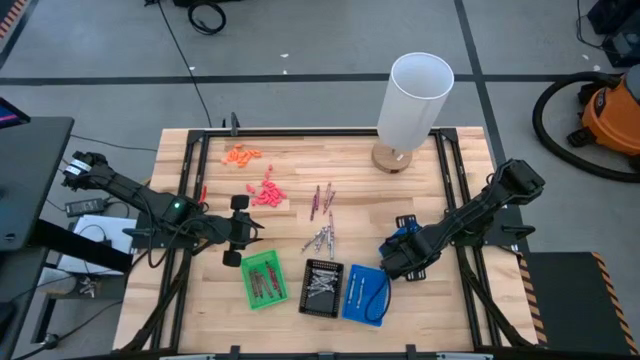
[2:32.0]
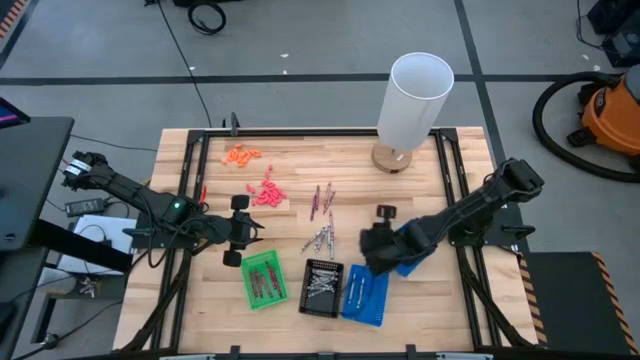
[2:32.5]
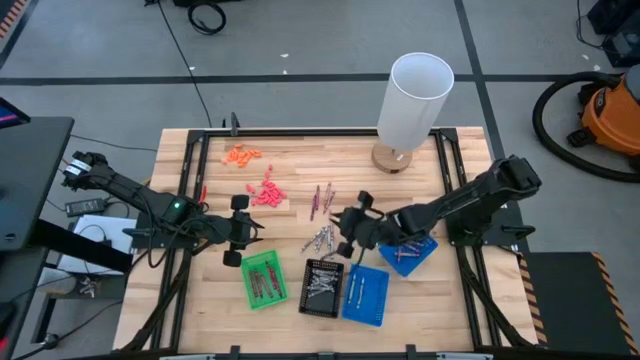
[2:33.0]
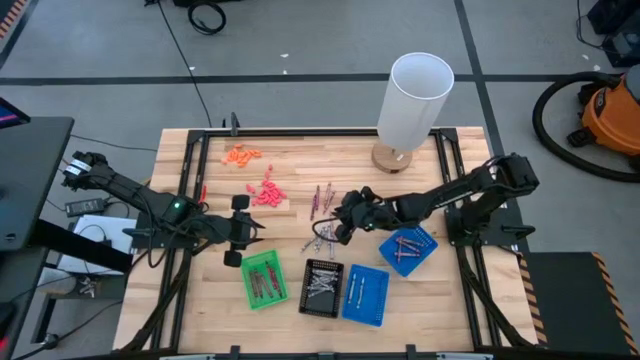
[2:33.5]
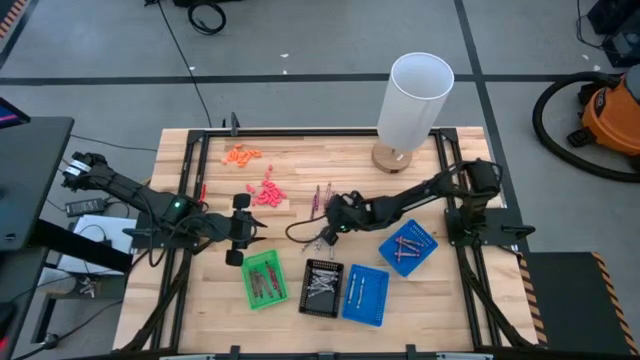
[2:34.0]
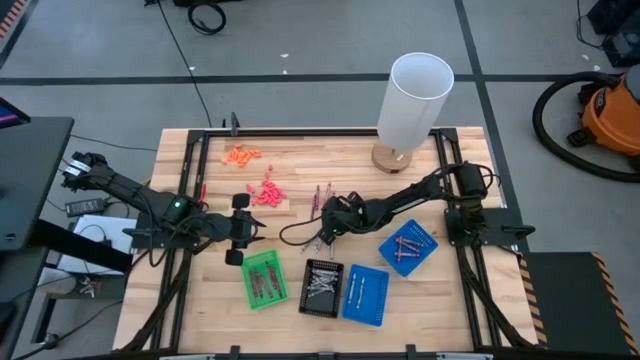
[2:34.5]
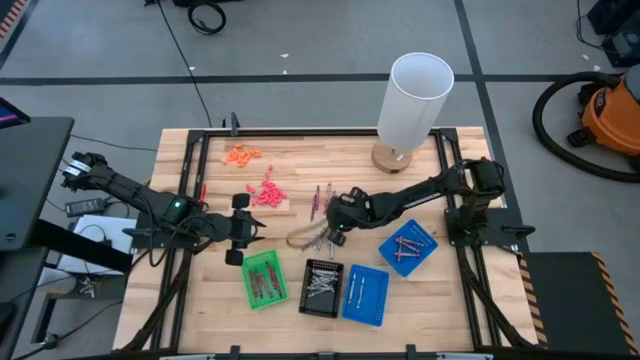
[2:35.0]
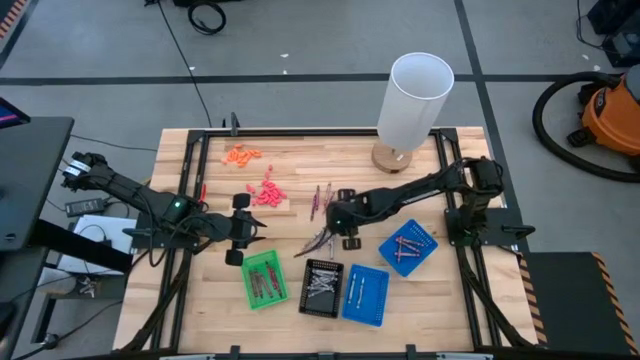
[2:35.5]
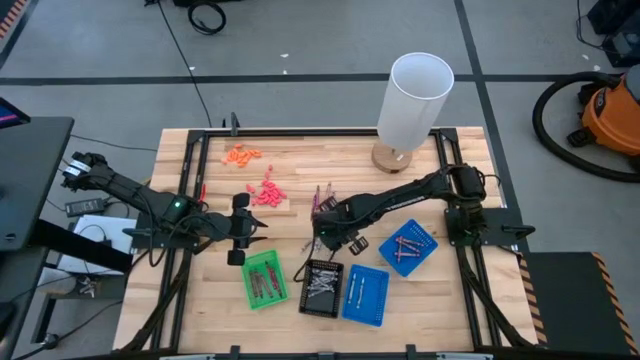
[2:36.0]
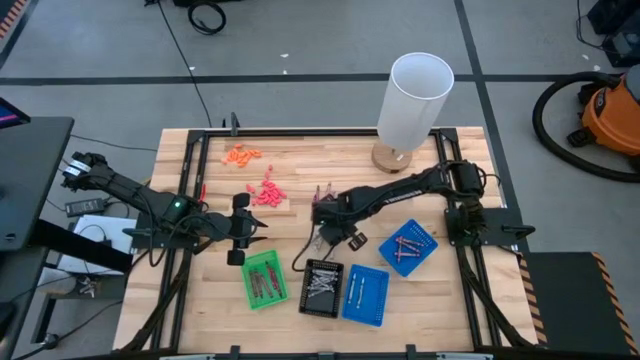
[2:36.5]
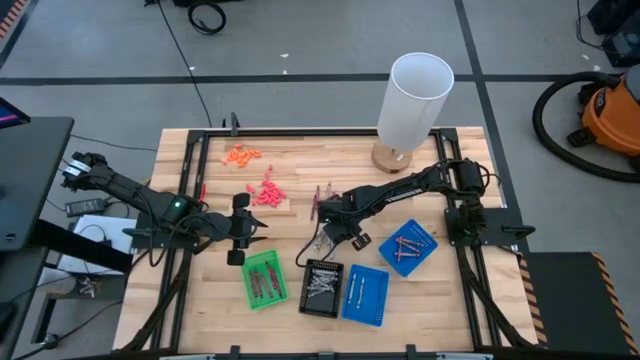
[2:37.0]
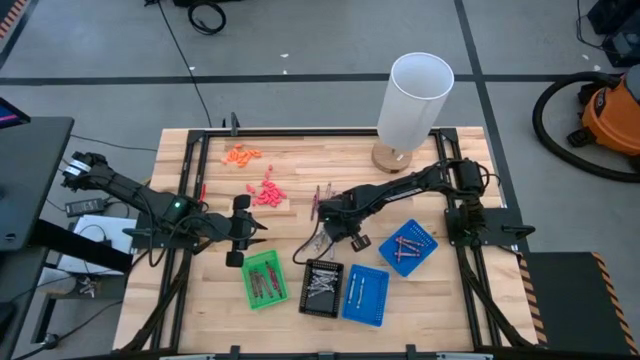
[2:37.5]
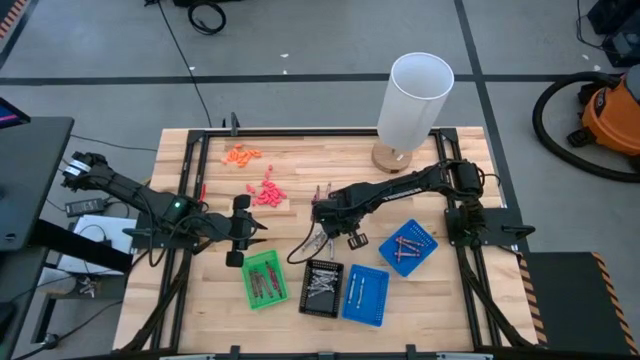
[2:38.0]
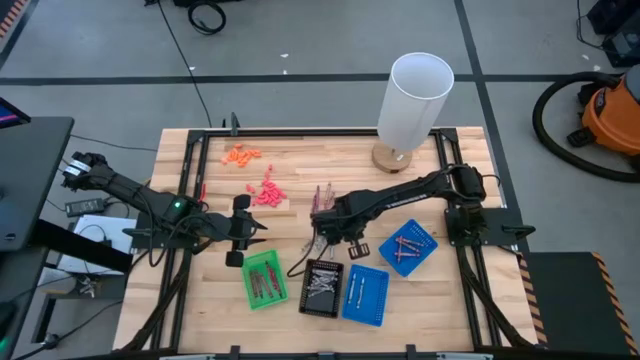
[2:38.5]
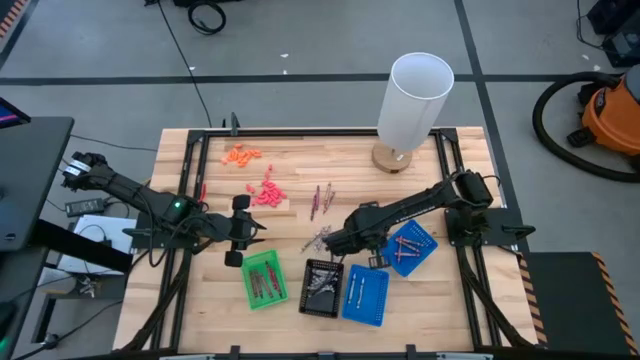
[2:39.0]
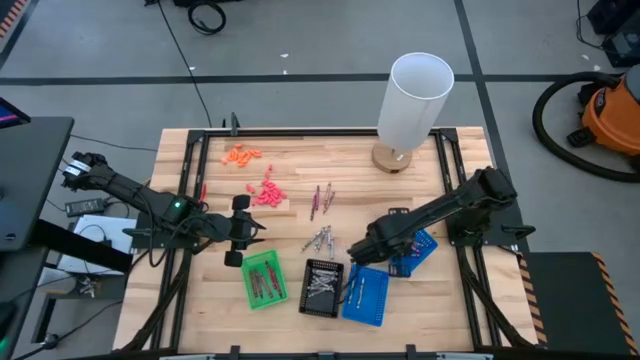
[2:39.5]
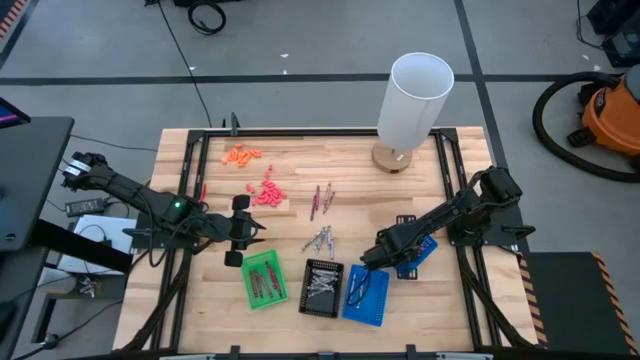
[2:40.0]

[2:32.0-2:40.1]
Task: Sort crayons
Put the pink crayon into the right blue basket

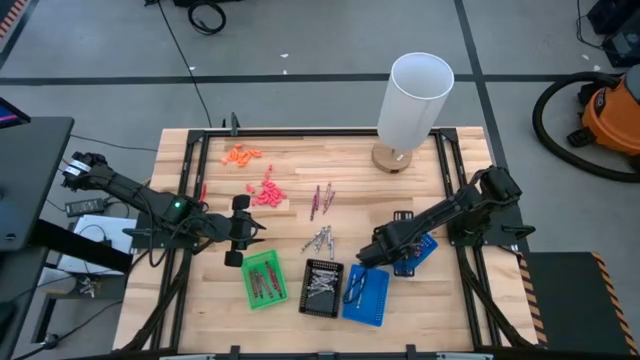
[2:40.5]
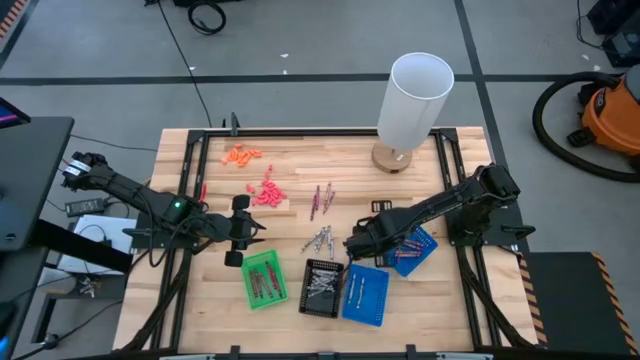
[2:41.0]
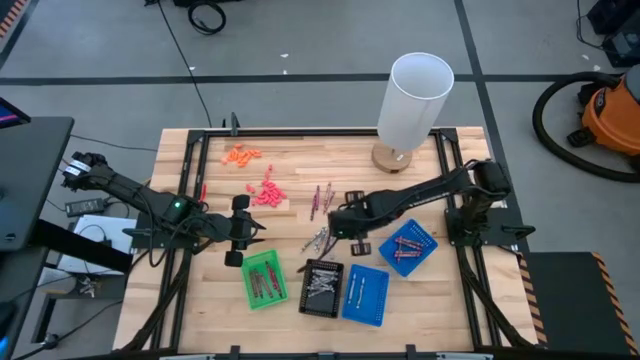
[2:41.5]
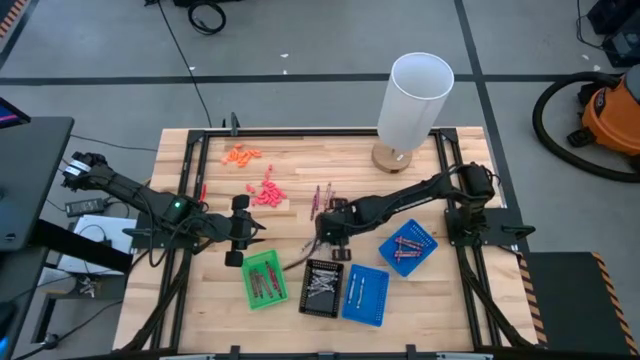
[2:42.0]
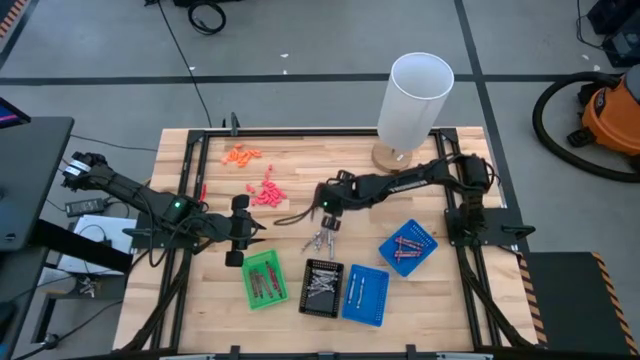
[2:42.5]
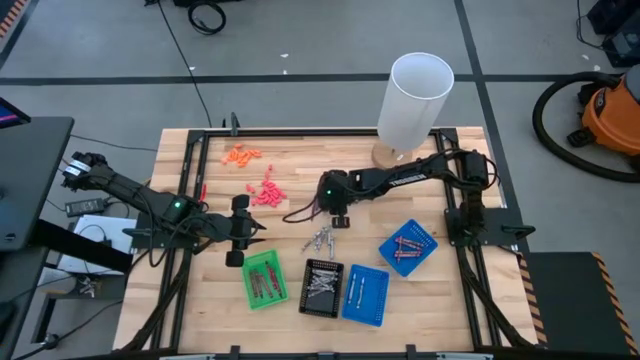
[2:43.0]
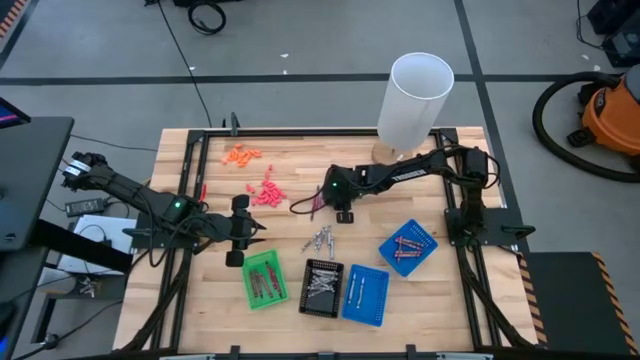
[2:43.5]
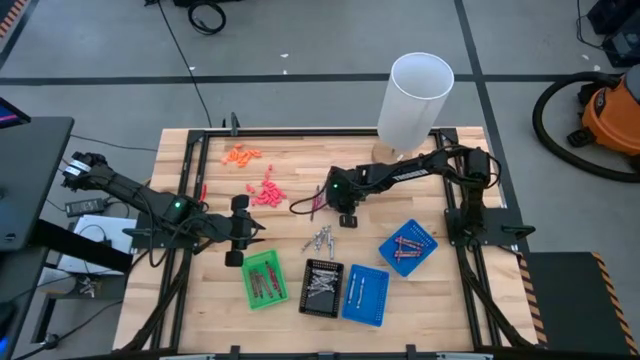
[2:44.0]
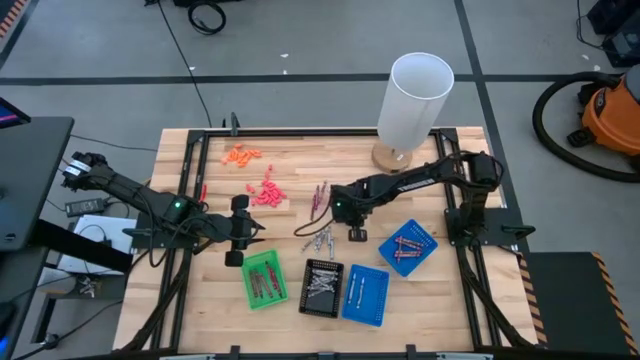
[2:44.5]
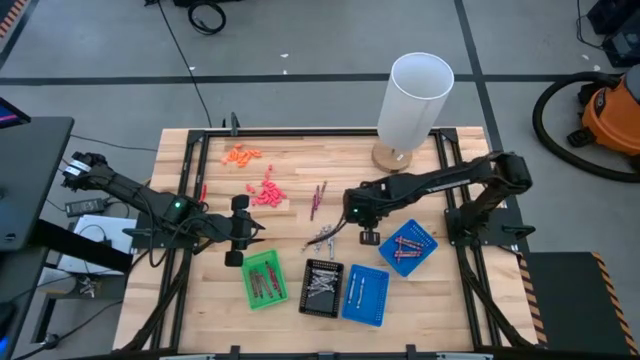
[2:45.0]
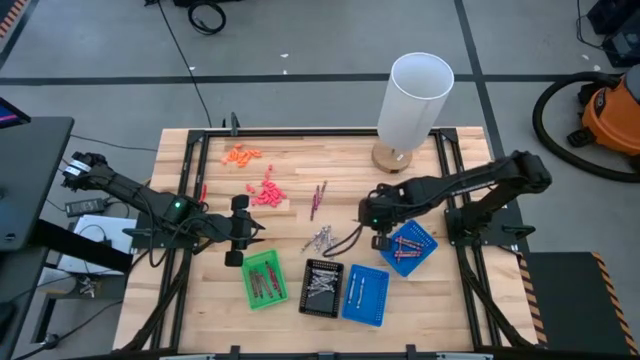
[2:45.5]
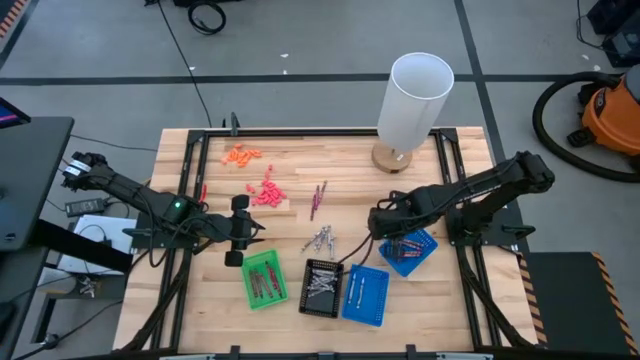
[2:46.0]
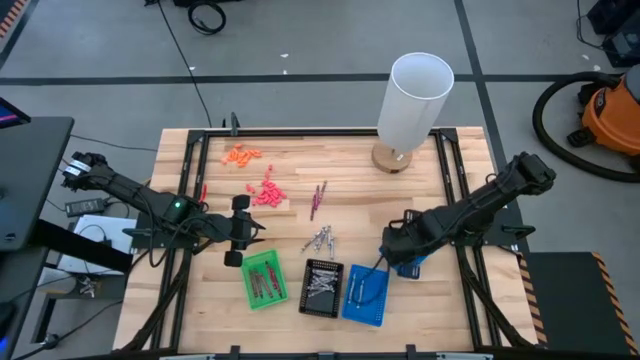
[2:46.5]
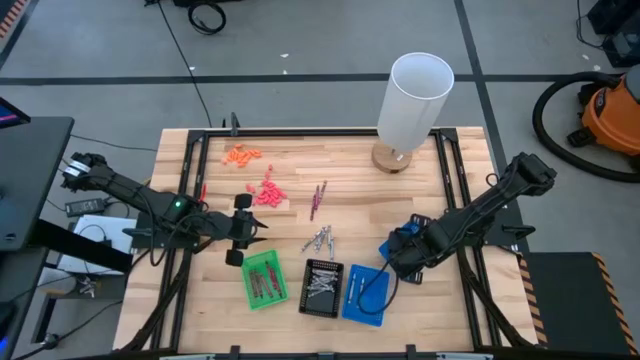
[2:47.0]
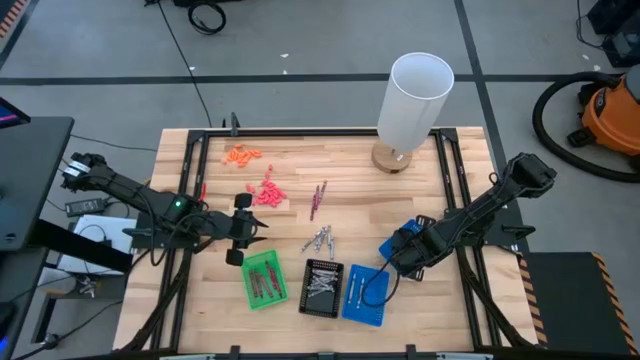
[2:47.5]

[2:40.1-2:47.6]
Put the pink crayon into the right blue basket

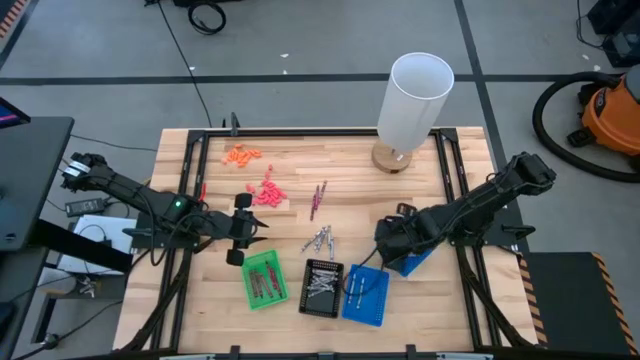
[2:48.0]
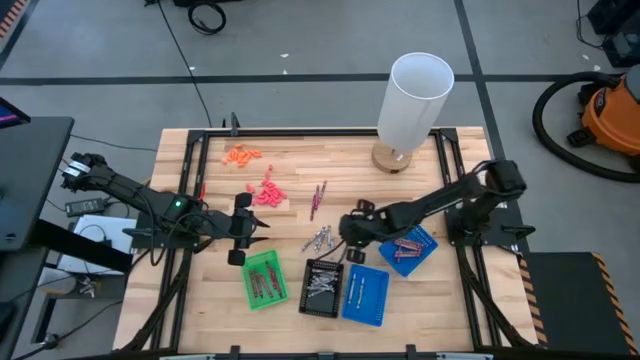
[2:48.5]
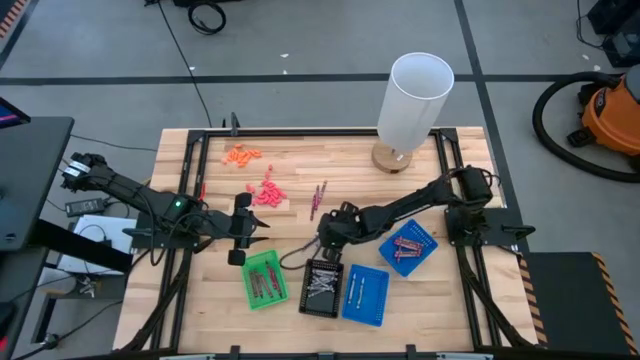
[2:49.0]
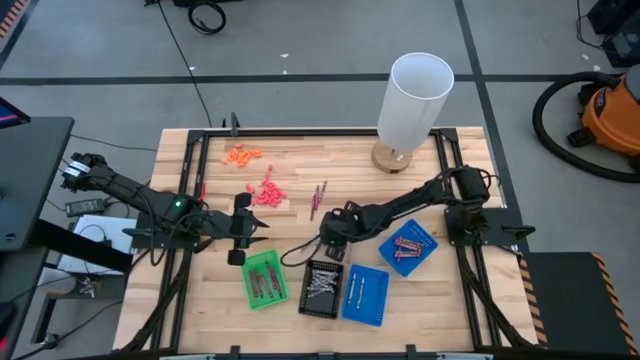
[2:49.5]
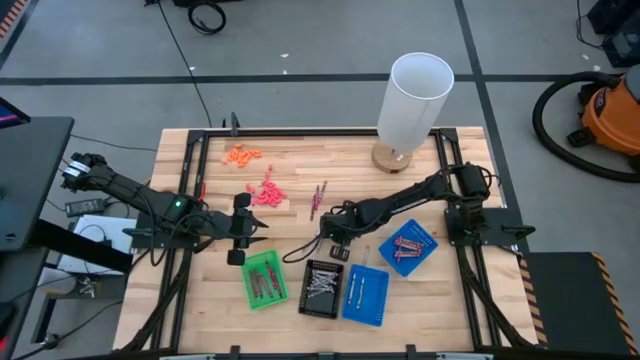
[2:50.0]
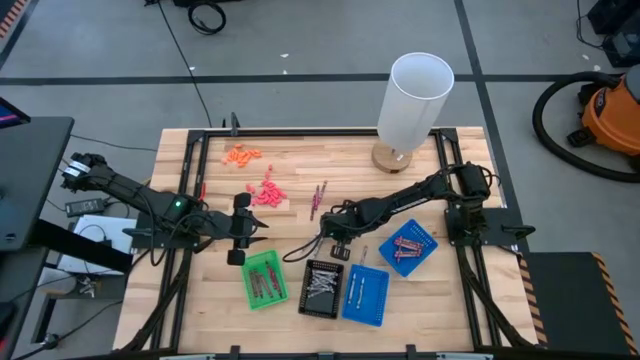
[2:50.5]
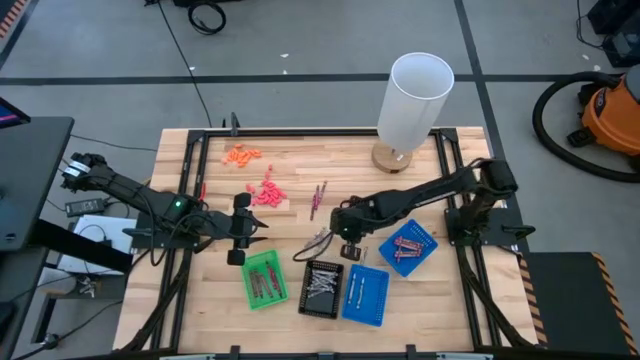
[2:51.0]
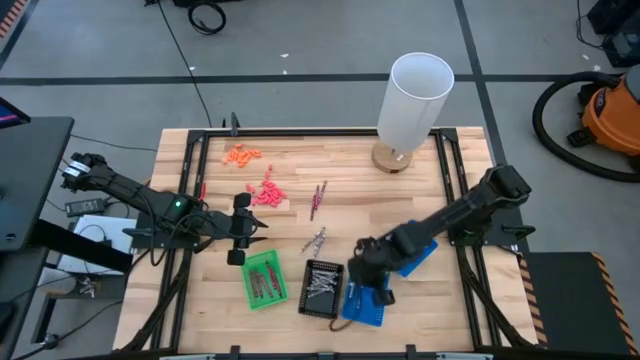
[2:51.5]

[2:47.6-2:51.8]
Put the white crayon into the left blue basket

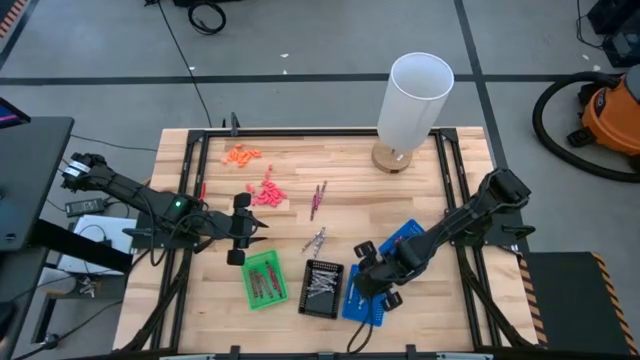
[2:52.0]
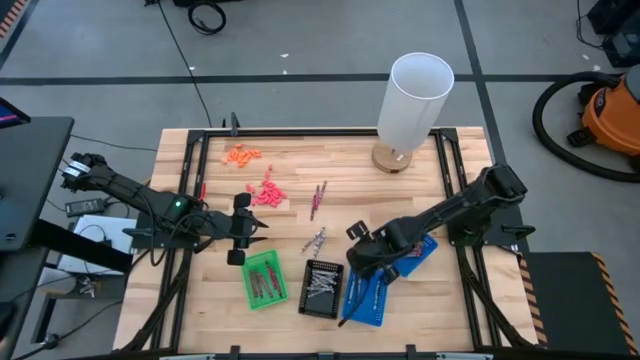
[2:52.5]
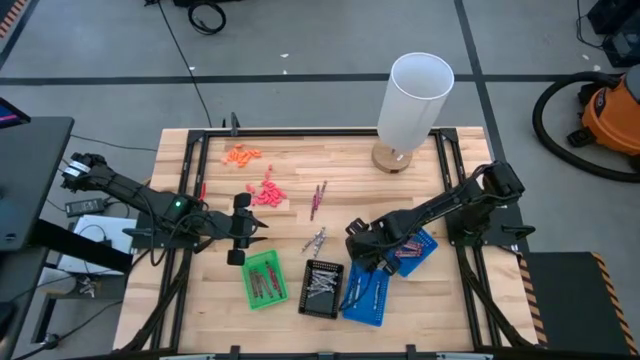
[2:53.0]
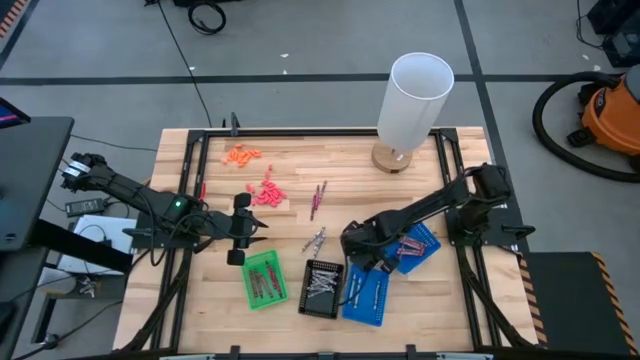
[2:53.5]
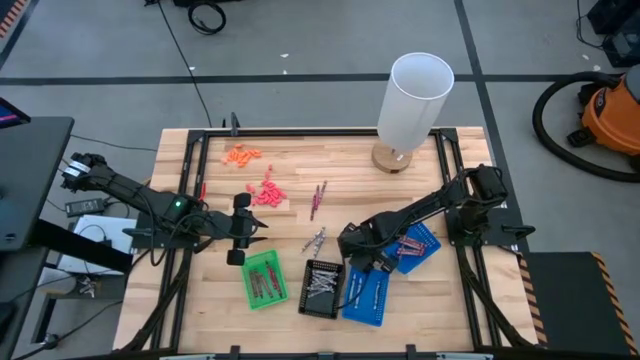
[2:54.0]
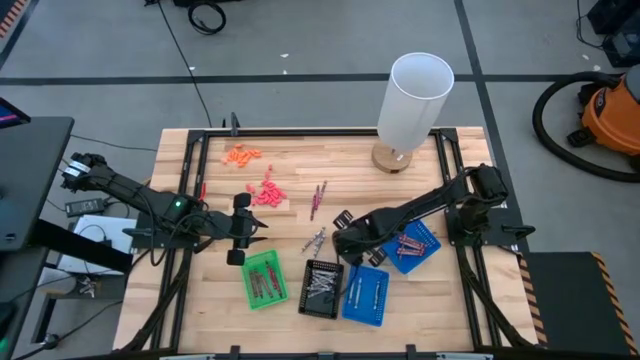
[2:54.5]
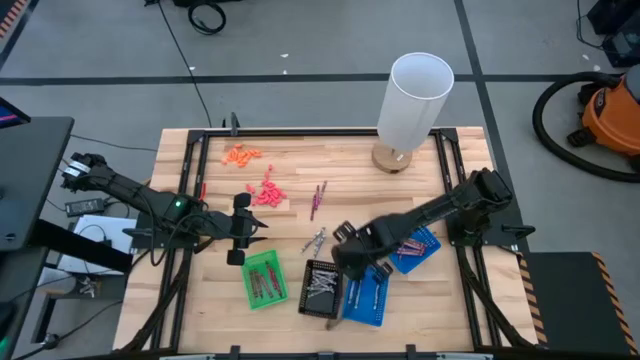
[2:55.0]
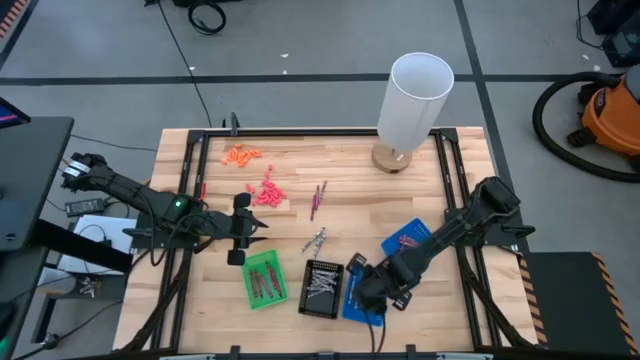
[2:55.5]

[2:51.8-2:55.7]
Put the white crayon into the left blue basket
